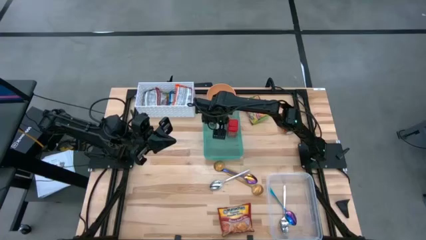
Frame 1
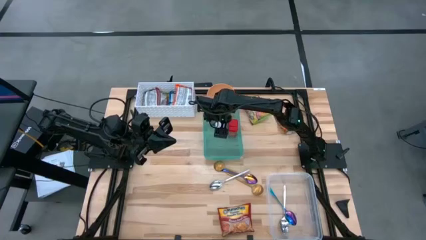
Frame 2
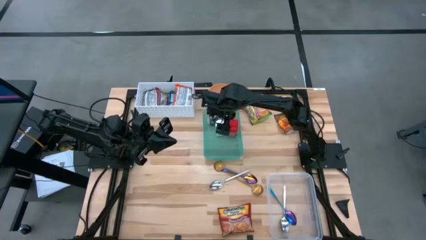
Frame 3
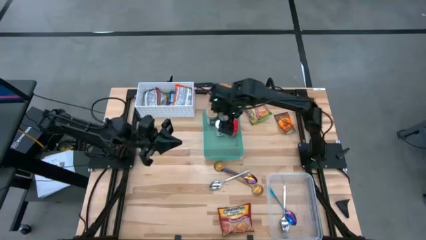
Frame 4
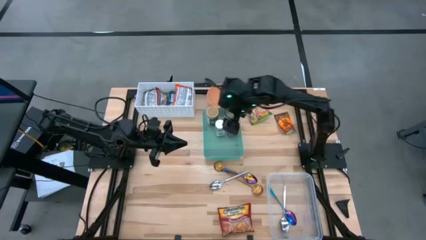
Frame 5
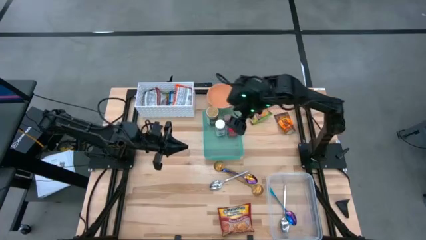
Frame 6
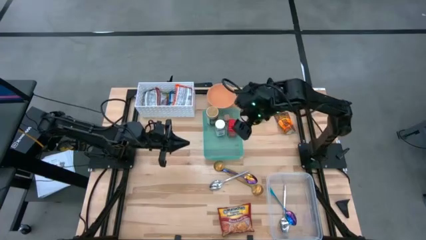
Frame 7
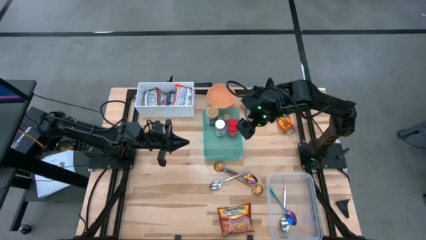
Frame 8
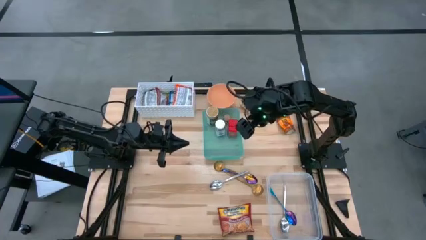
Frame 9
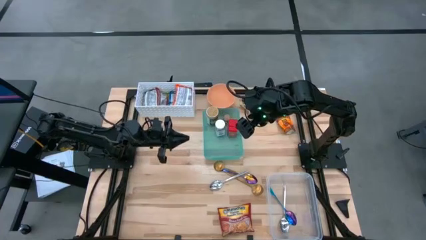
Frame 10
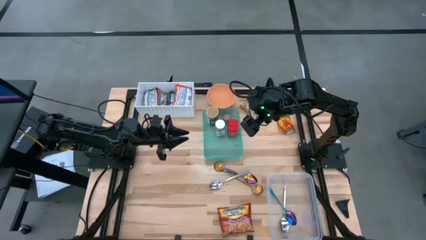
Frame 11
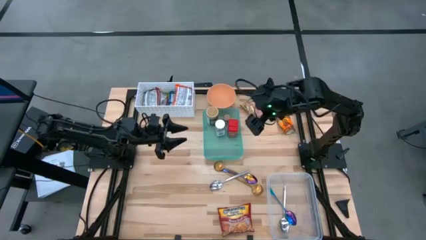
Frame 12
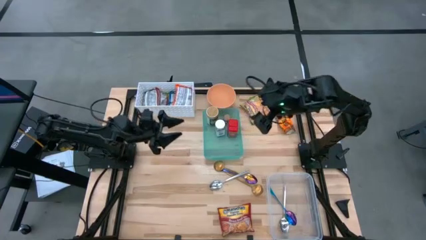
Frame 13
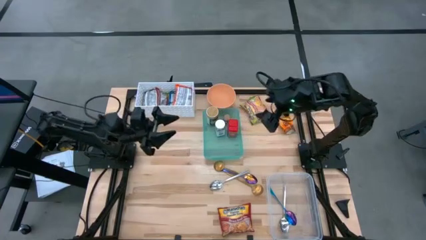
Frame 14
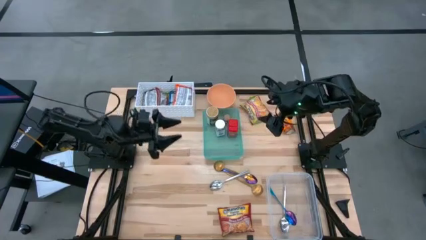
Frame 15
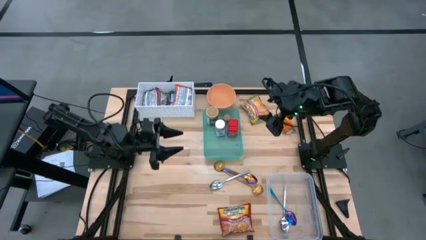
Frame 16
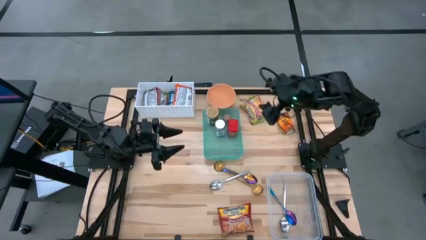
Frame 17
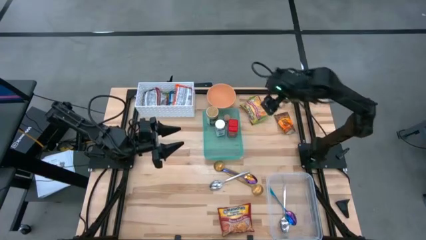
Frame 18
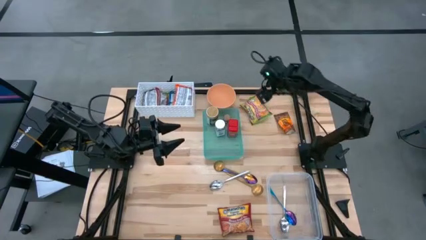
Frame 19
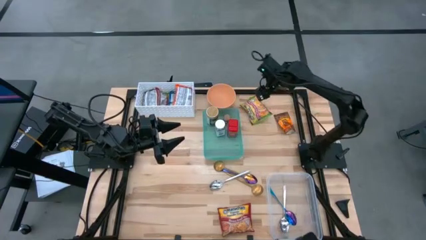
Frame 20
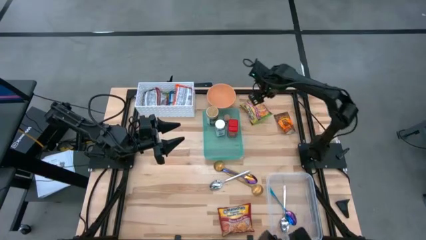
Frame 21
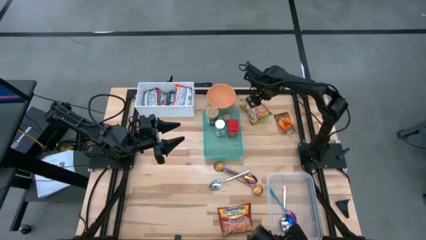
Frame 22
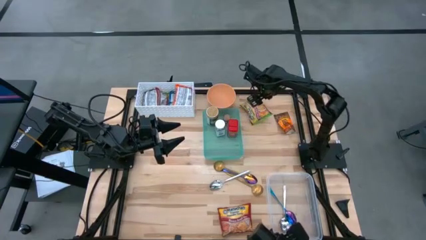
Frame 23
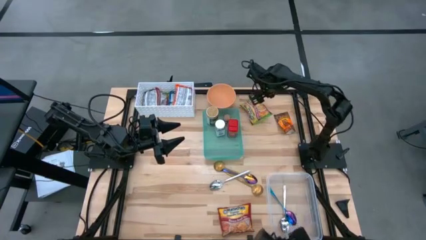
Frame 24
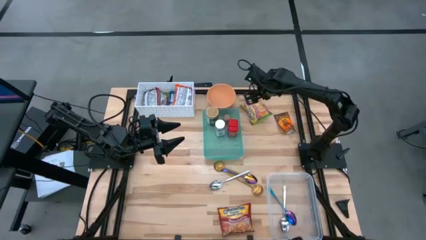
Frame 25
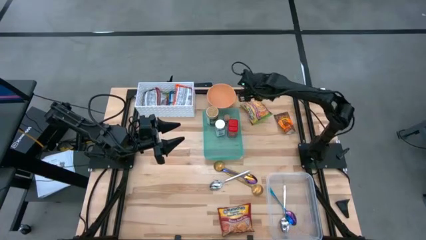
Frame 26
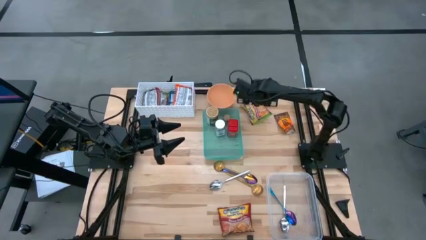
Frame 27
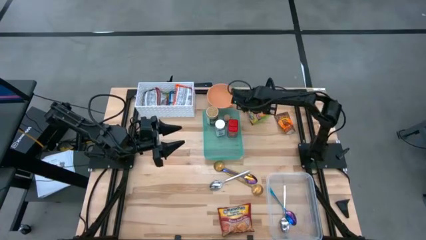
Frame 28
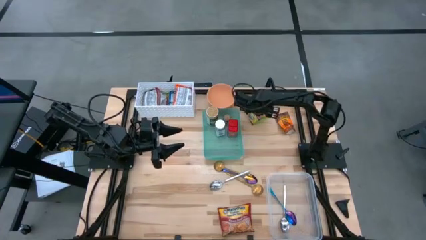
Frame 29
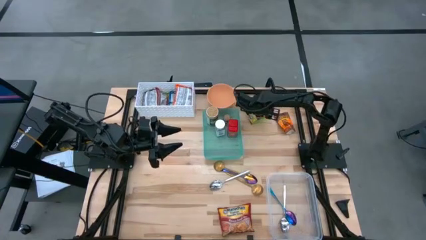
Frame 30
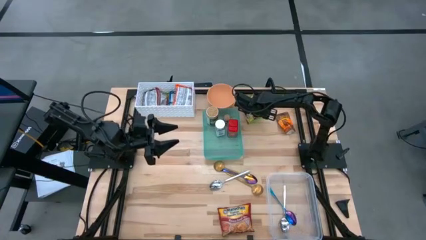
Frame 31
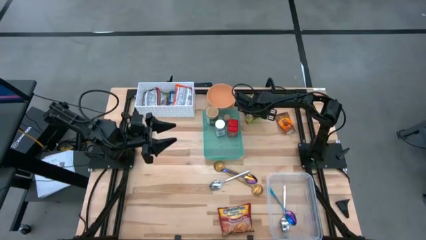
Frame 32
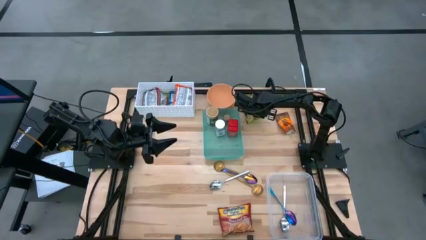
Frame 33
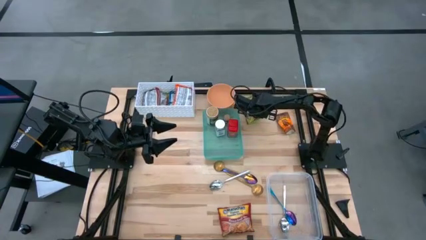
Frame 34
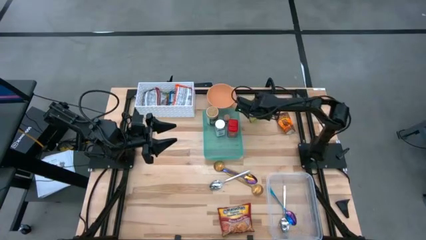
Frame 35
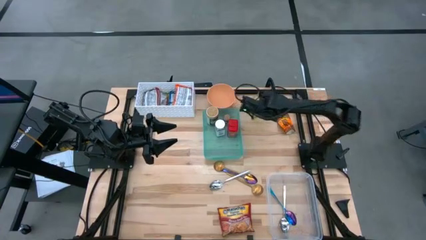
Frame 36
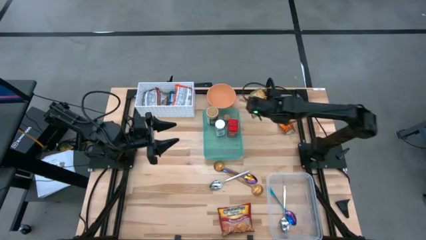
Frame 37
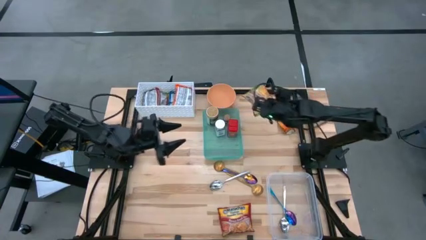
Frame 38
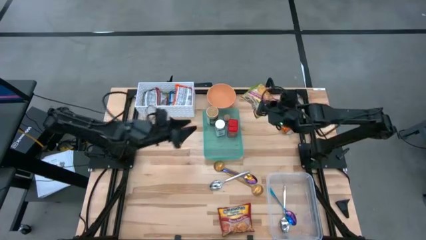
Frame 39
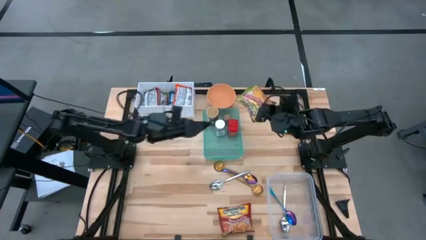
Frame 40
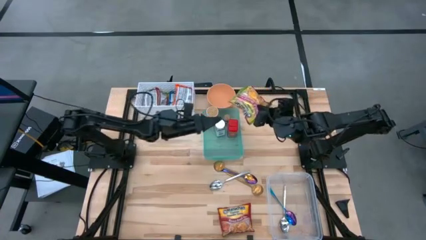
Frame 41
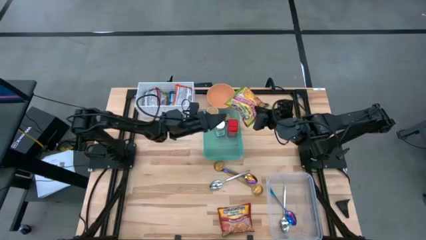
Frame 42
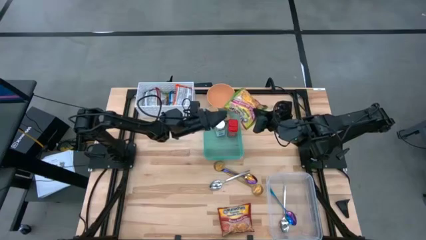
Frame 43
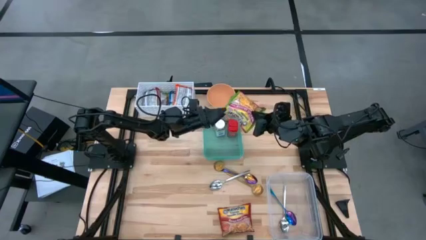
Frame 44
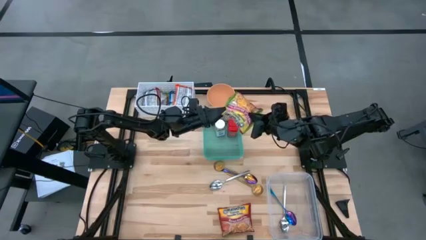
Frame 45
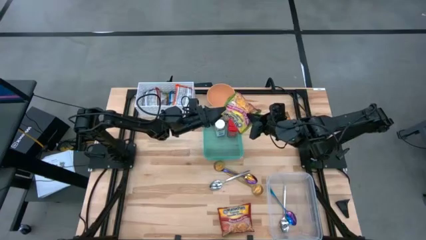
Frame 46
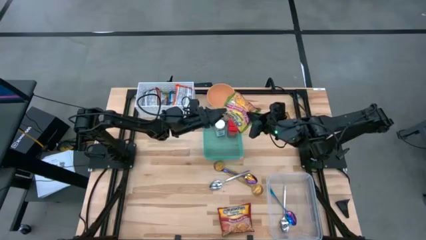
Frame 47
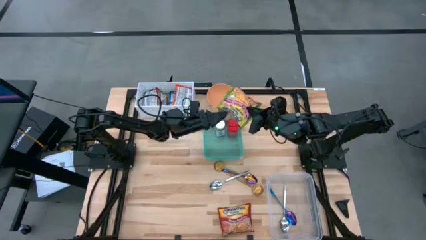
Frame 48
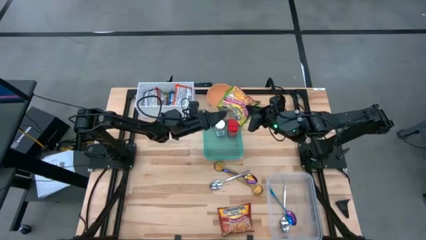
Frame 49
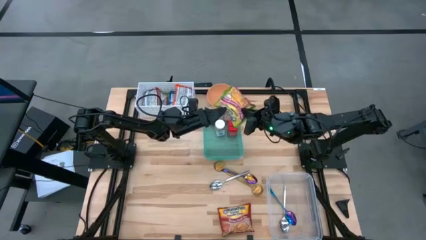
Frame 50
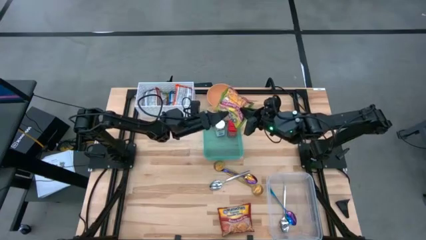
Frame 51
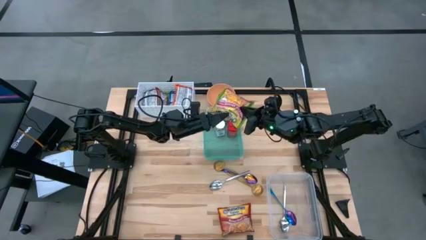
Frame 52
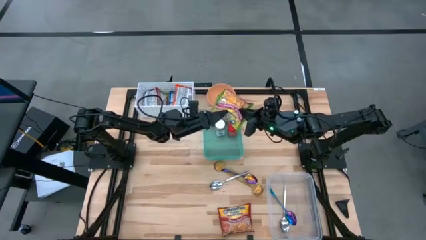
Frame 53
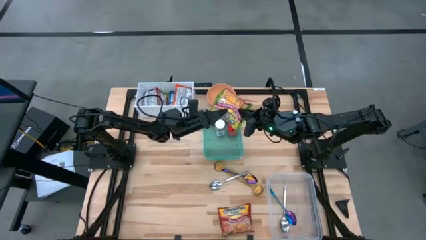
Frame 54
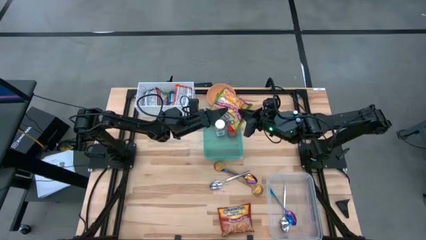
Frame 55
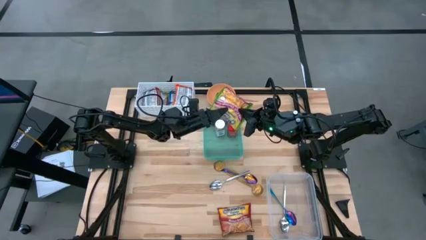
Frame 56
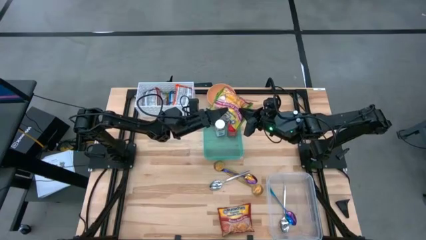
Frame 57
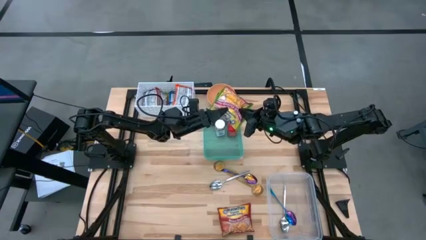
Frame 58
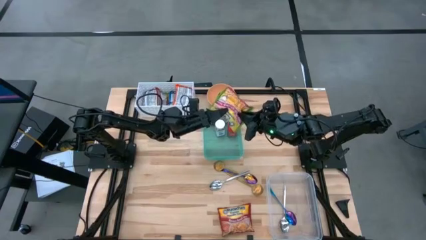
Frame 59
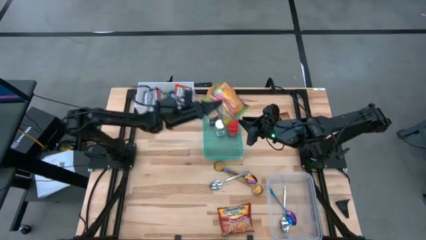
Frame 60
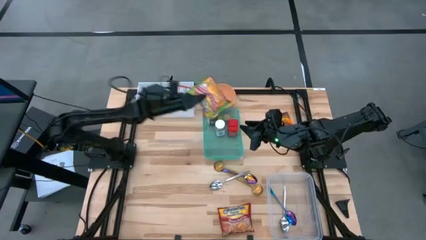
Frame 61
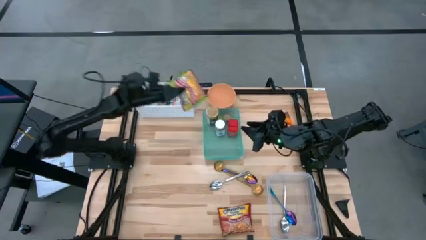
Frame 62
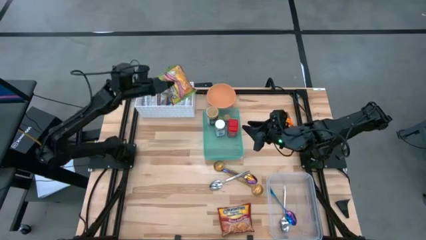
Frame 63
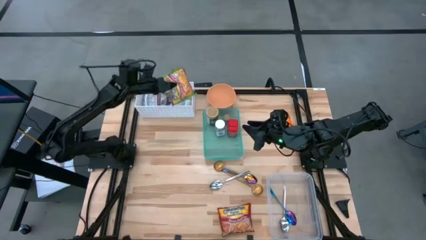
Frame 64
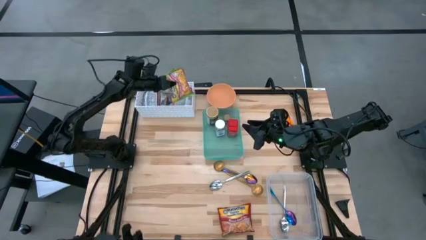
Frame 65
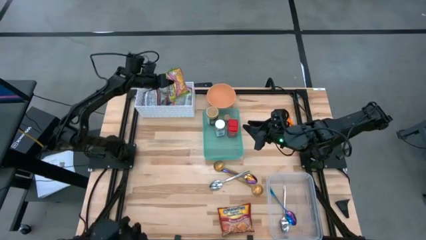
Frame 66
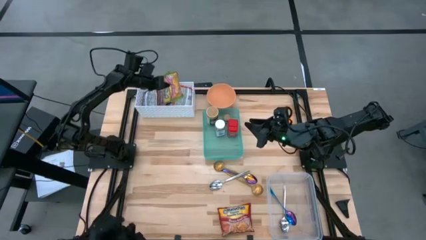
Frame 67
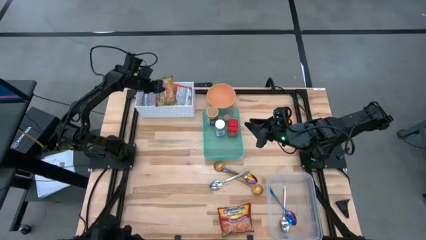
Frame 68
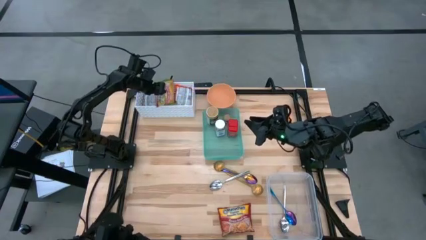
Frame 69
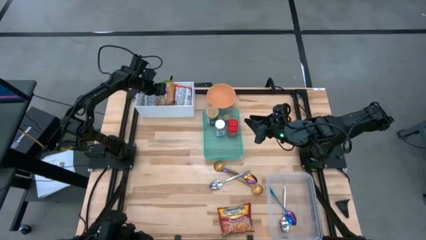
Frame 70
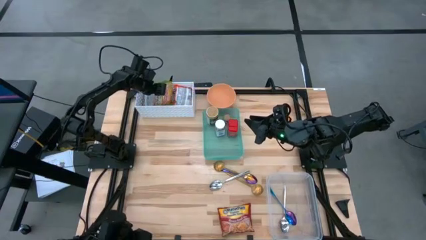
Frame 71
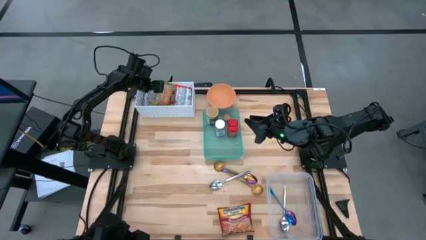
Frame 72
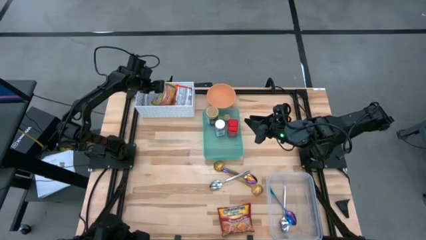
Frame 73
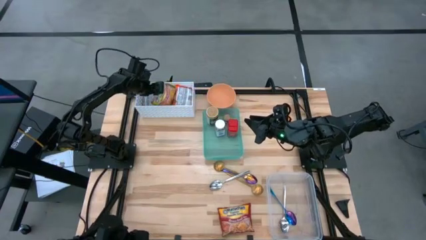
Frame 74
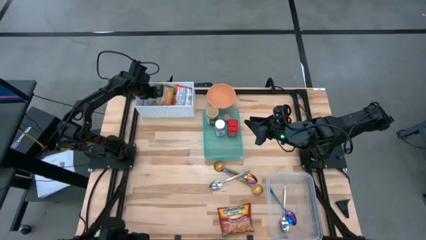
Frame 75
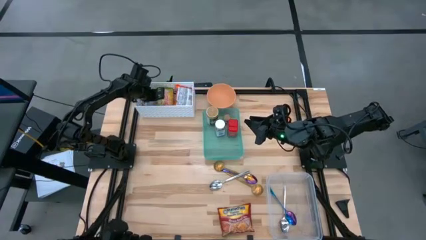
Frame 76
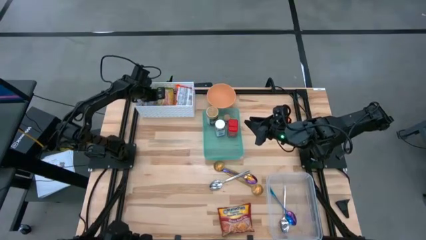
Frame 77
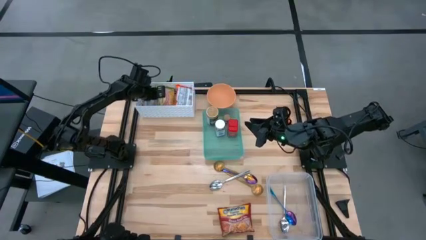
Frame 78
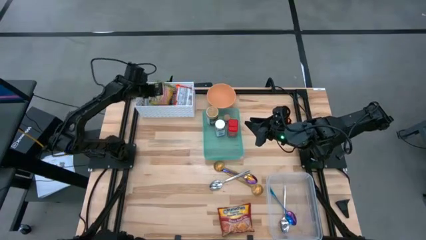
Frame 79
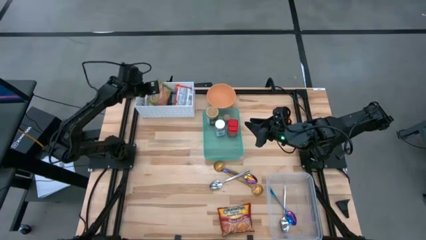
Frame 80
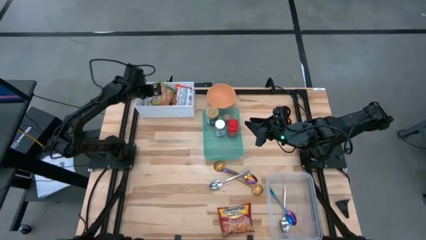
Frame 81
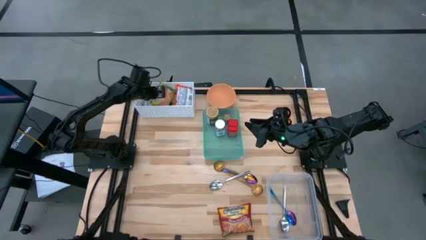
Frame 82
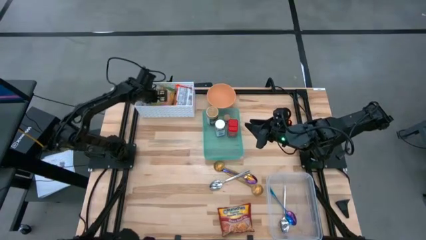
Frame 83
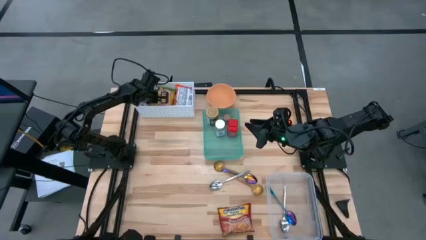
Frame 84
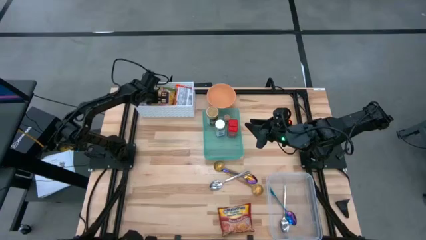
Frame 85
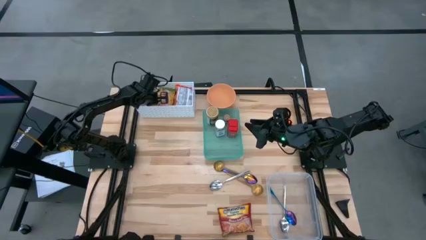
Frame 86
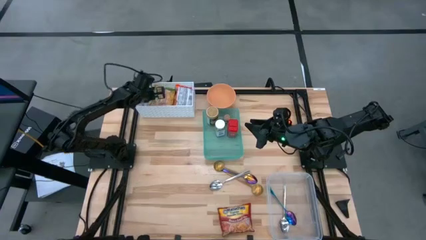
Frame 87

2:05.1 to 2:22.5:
Task: Pick & Place Food Item
Put the green noodles pack into the white bin
